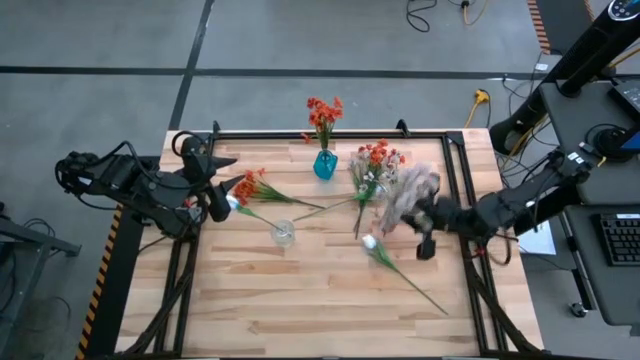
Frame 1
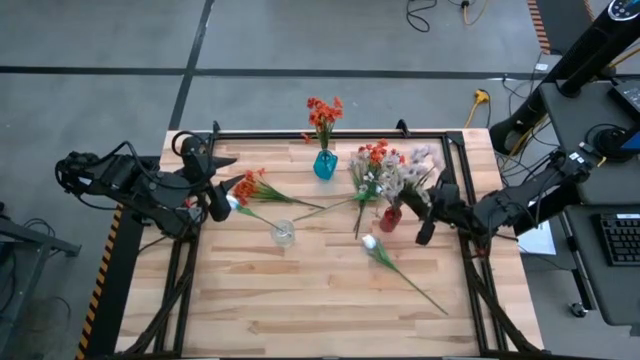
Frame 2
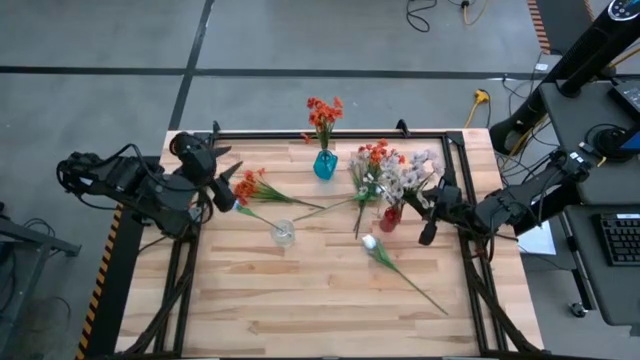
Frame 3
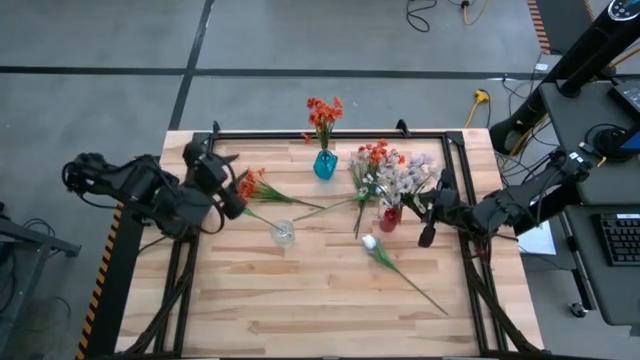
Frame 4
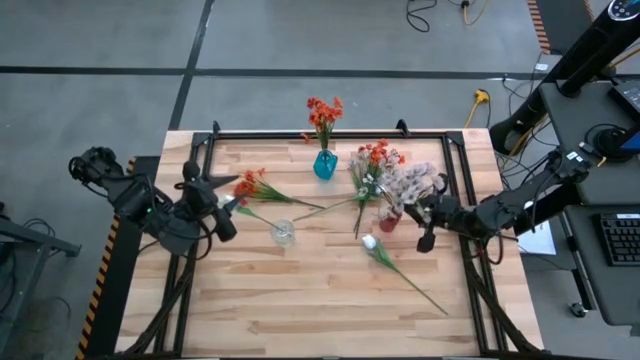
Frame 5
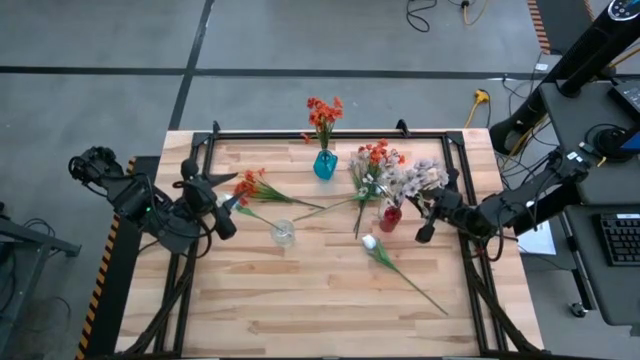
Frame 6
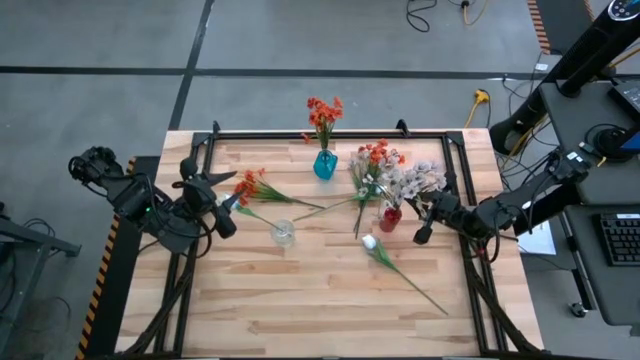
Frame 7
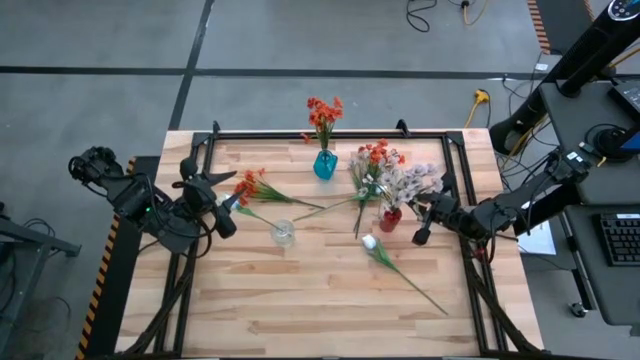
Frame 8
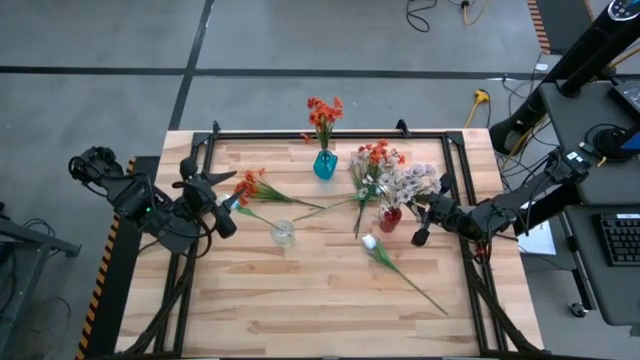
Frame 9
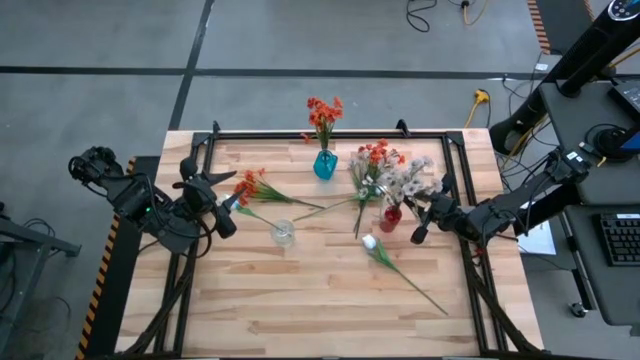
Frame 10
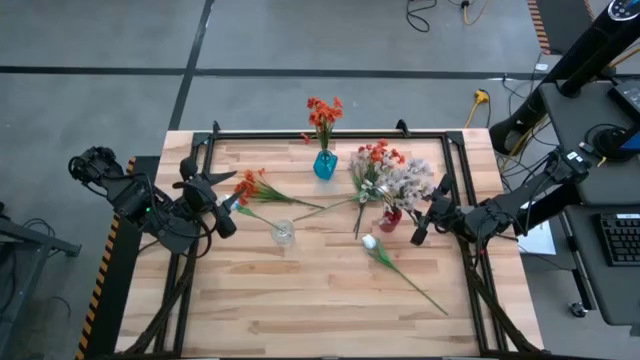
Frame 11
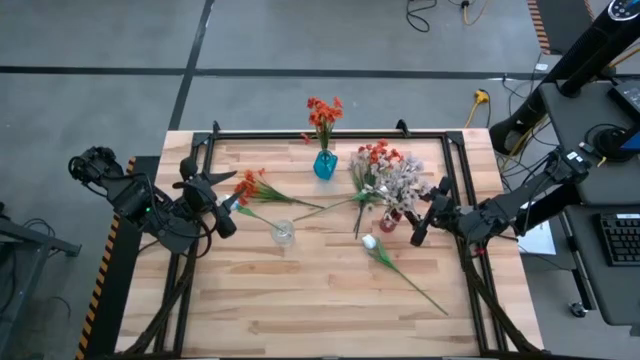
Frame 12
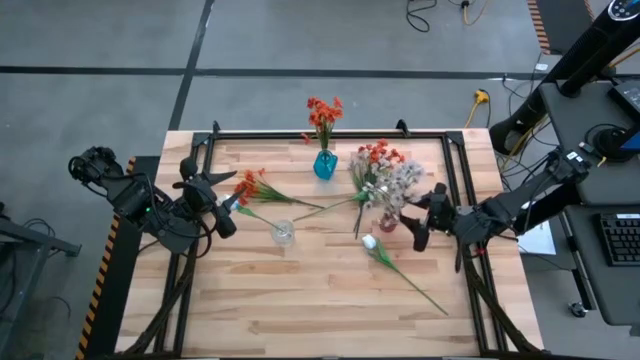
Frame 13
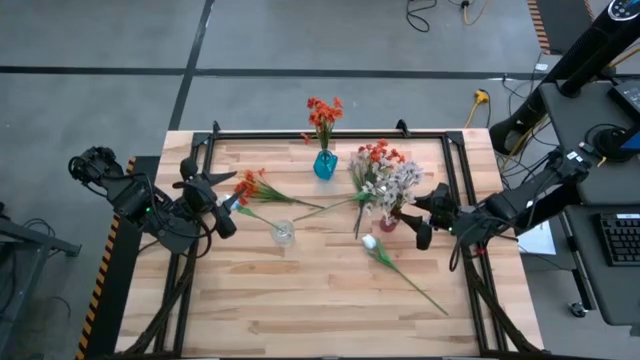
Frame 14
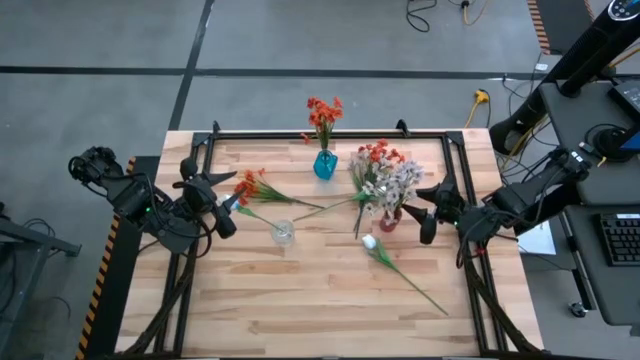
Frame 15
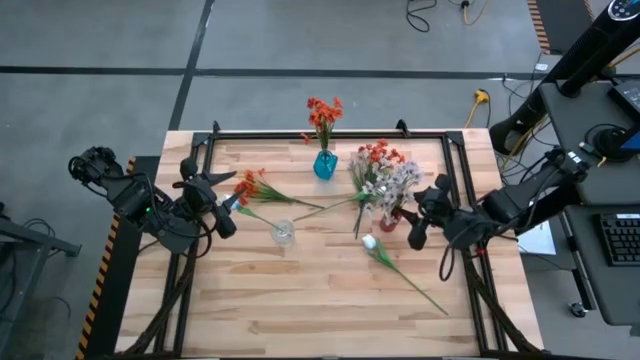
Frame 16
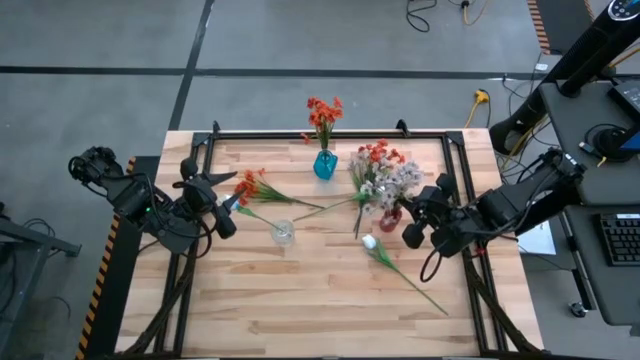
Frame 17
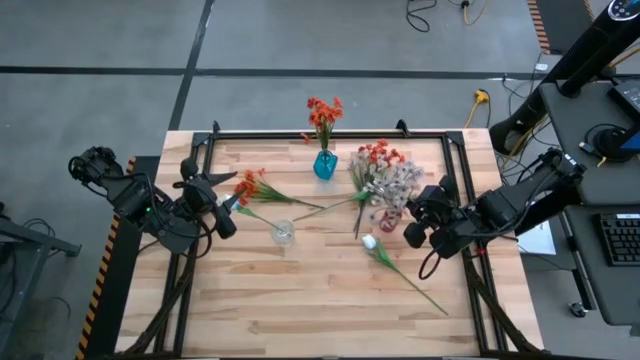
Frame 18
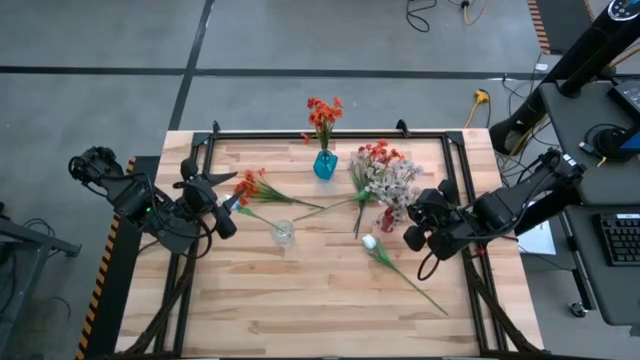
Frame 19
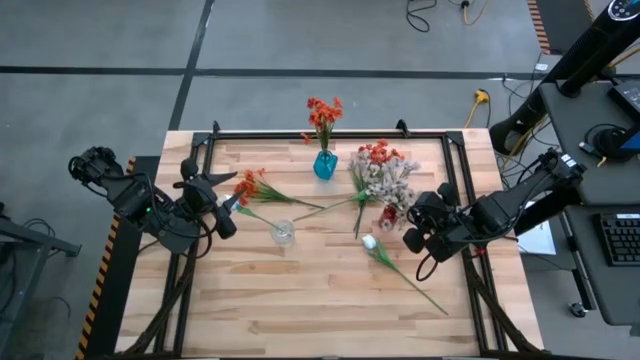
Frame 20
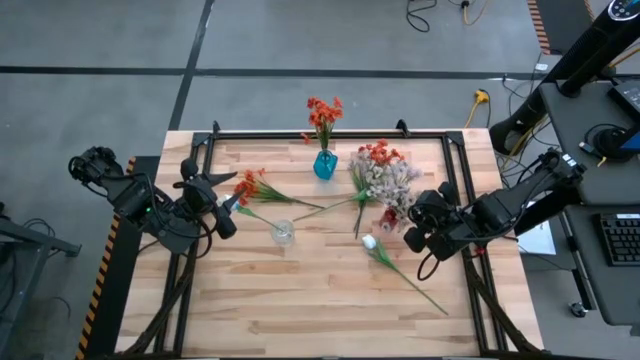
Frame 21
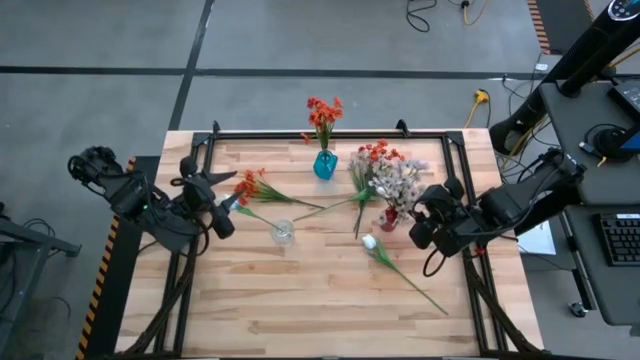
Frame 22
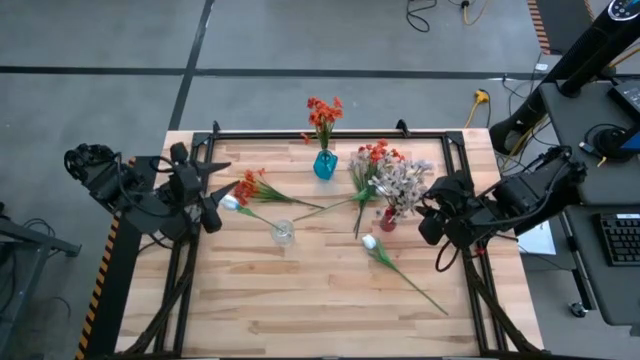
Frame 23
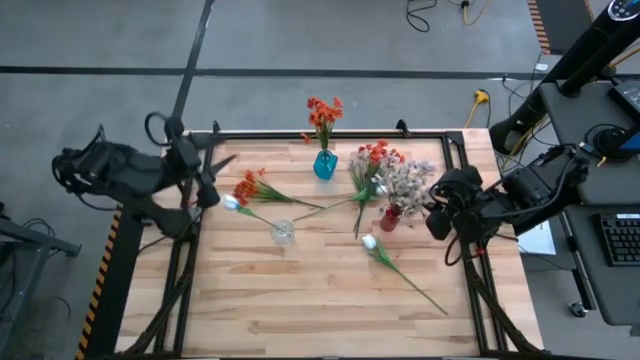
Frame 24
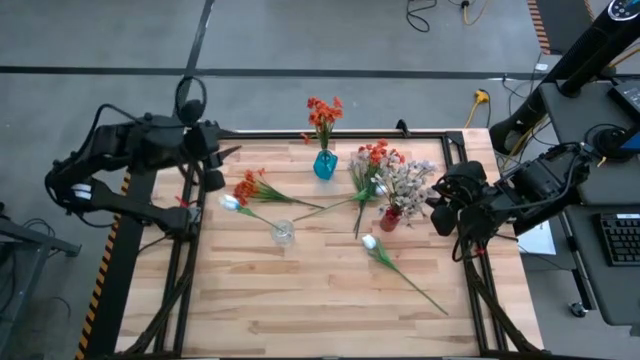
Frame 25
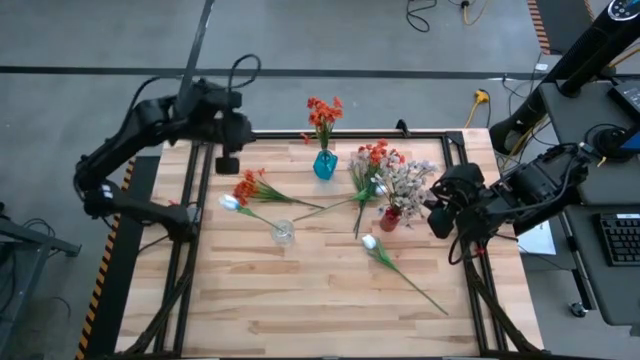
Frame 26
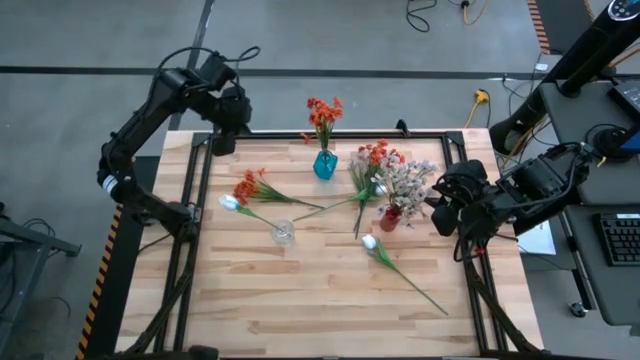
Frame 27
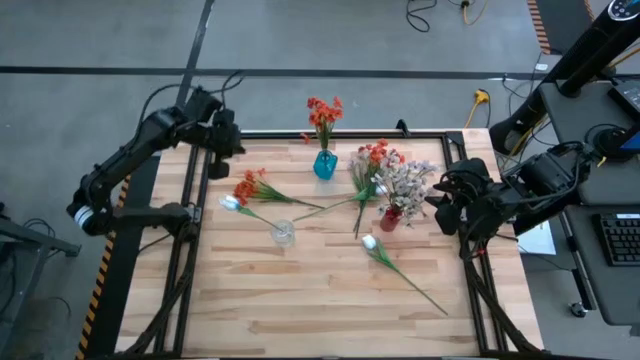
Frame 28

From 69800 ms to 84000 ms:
Task: Sort flowers into vase by color
Put the bottom white flowers into the red vase

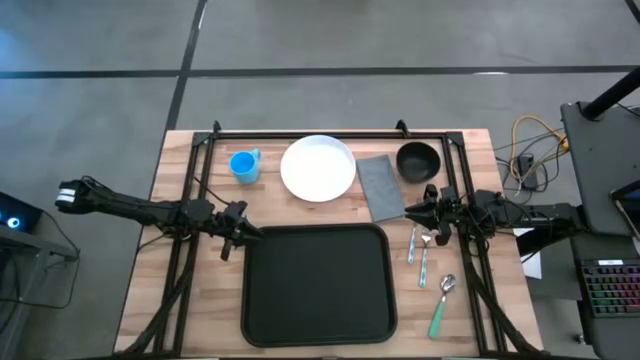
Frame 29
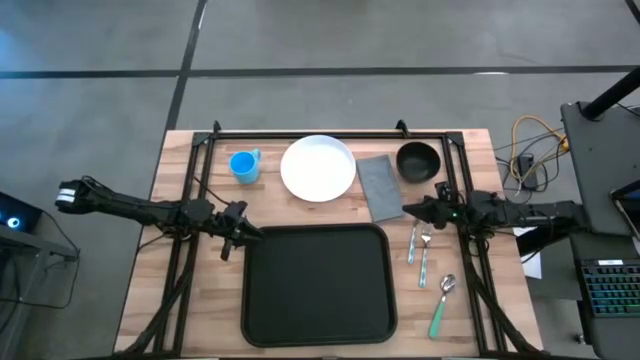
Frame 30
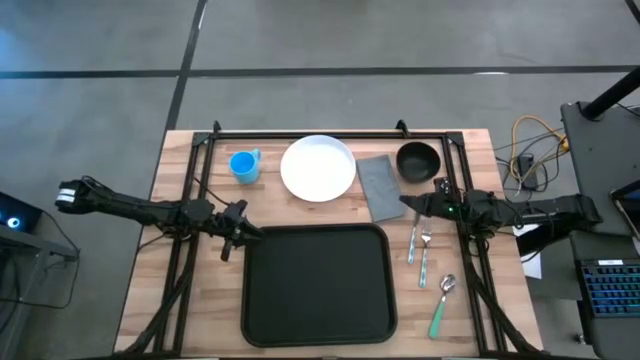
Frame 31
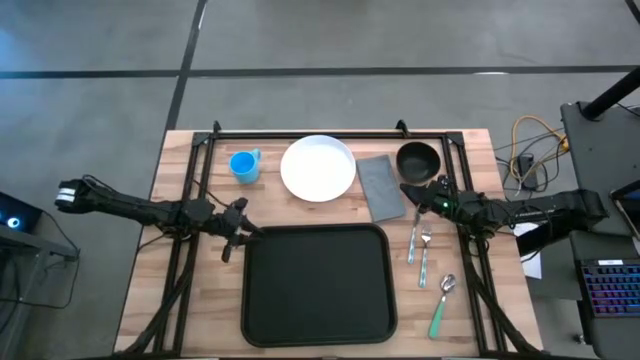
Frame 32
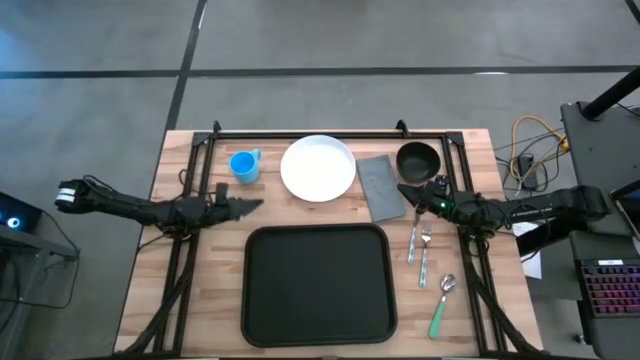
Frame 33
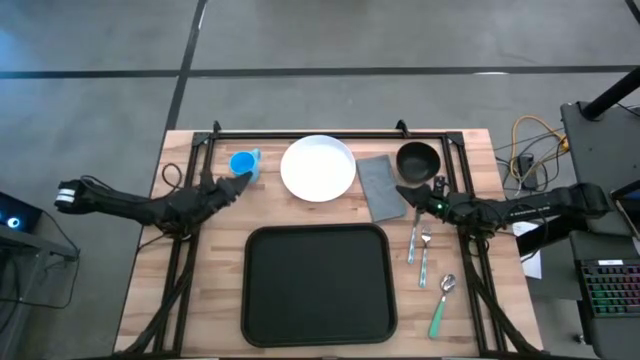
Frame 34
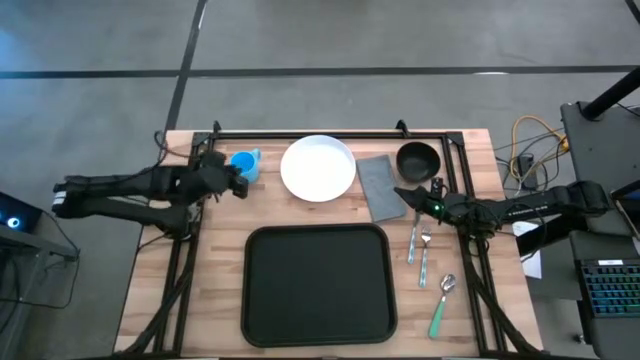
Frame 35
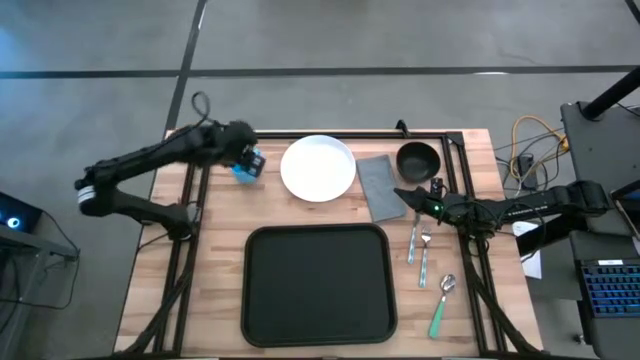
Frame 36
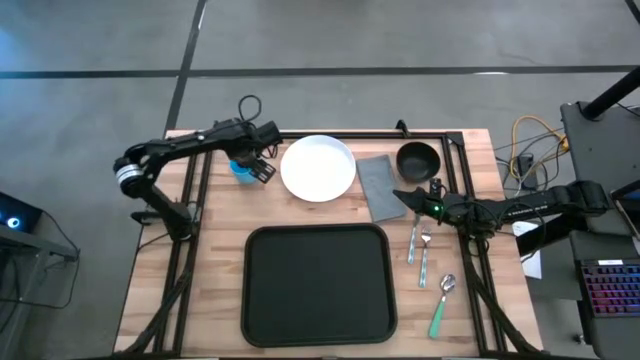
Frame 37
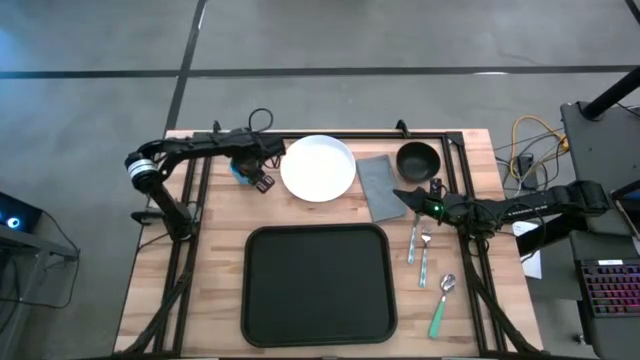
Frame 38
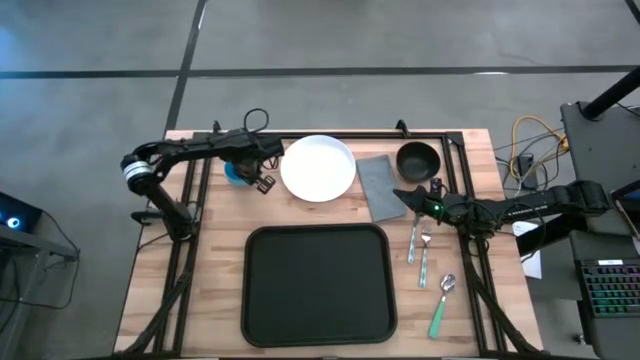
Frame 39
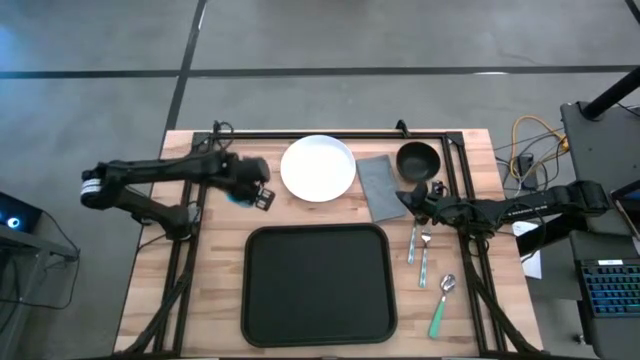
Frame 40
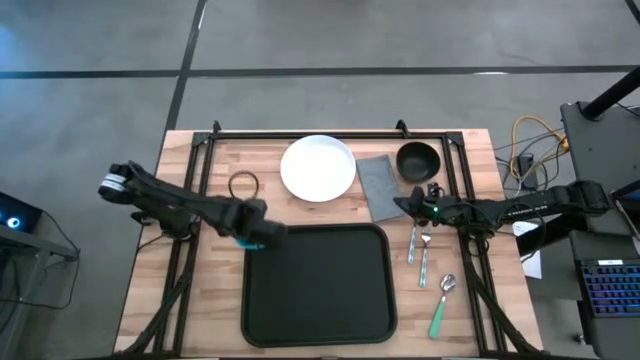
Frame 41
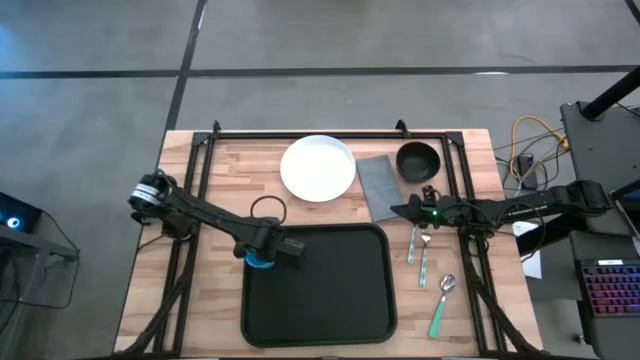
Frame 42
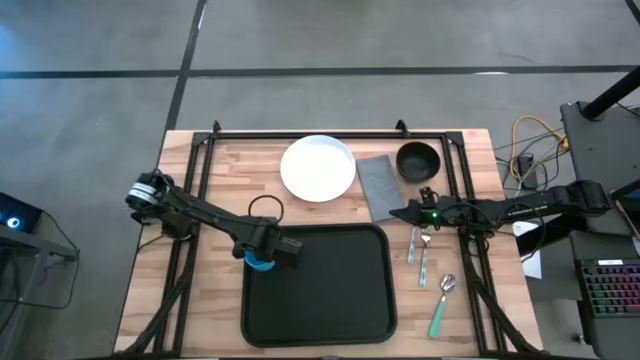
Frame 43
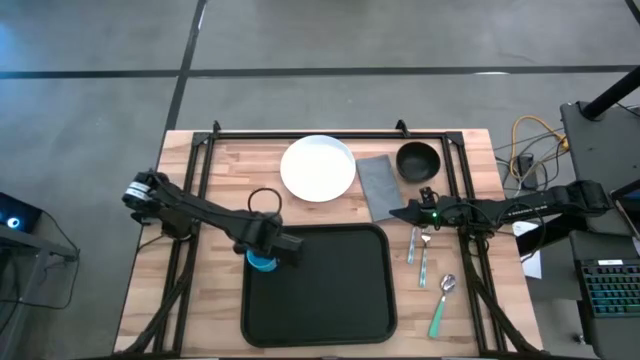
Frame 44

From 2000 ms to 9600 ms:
Task: Set up tray
Put the blue mug on the black tray
